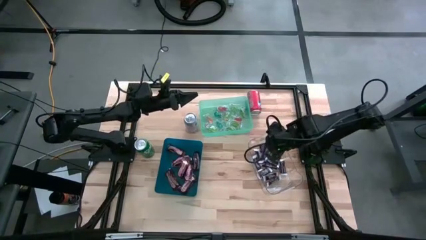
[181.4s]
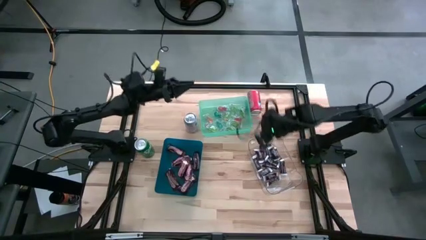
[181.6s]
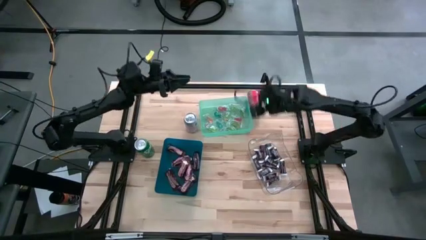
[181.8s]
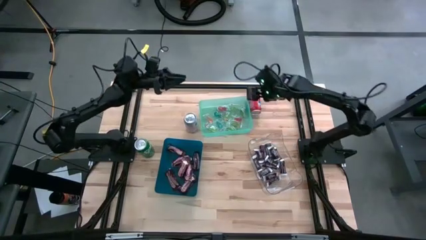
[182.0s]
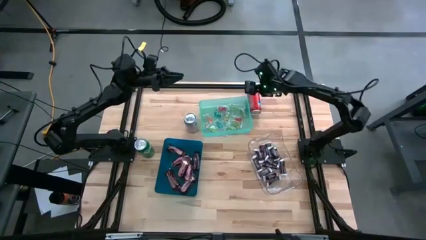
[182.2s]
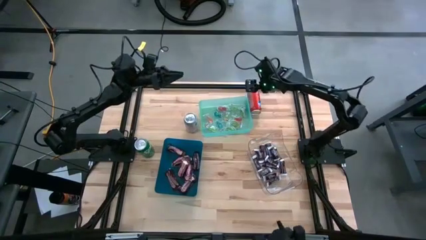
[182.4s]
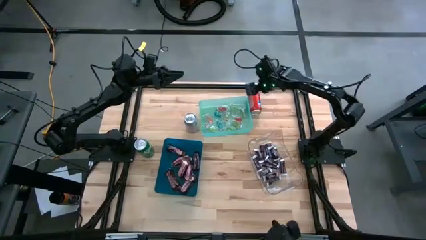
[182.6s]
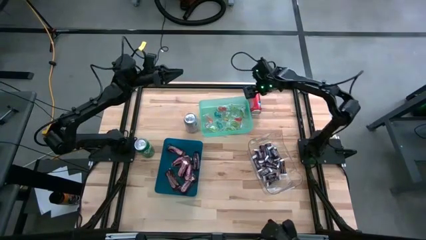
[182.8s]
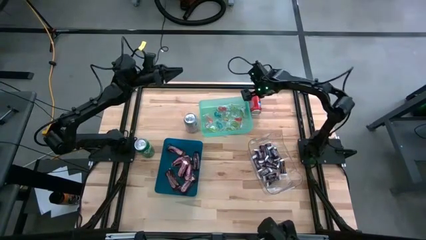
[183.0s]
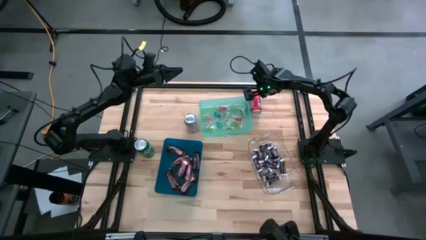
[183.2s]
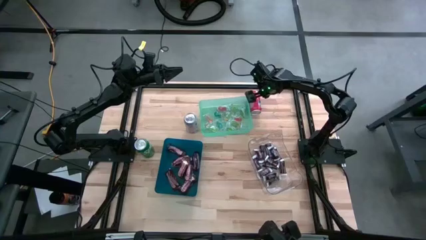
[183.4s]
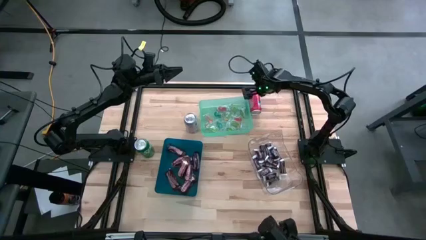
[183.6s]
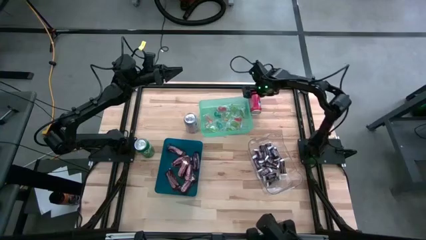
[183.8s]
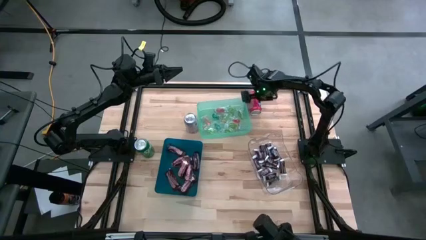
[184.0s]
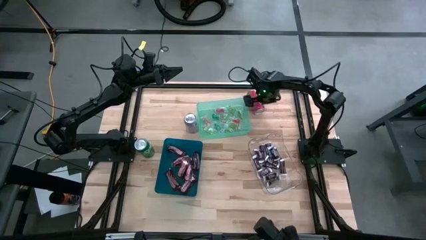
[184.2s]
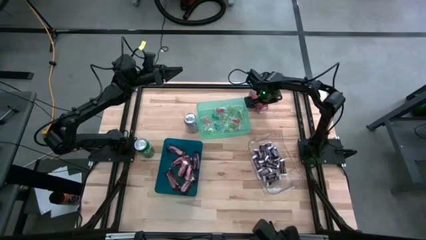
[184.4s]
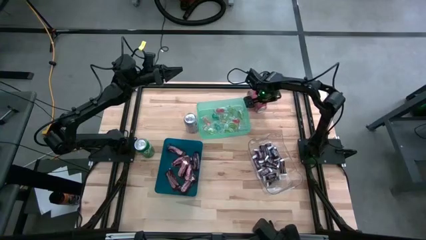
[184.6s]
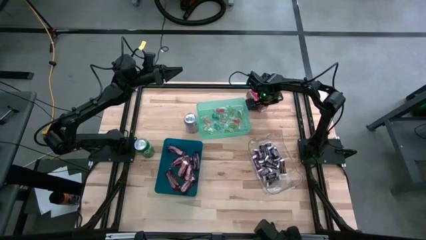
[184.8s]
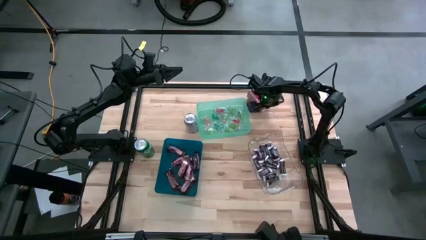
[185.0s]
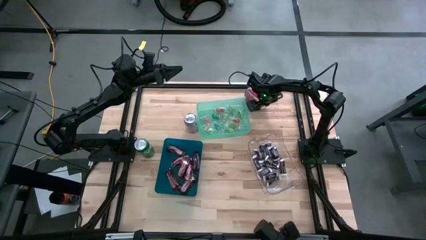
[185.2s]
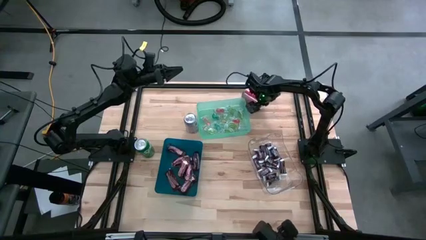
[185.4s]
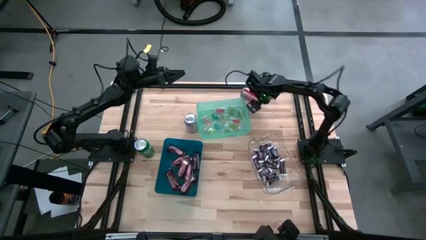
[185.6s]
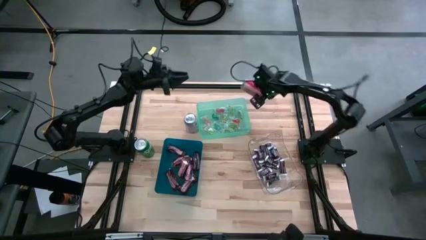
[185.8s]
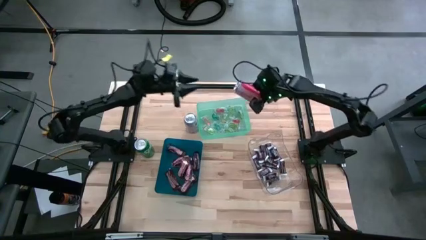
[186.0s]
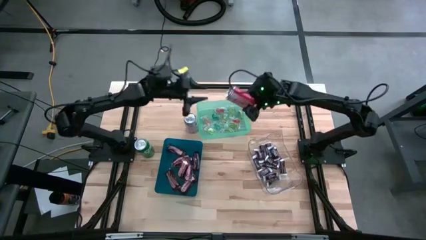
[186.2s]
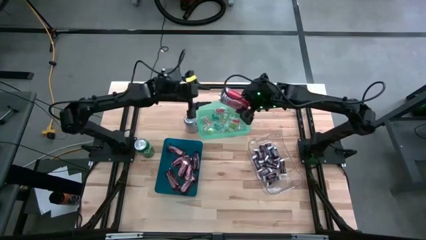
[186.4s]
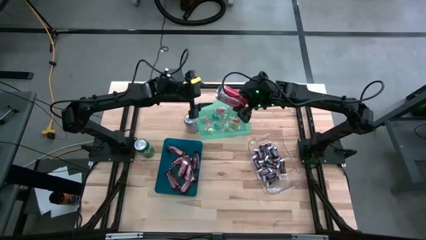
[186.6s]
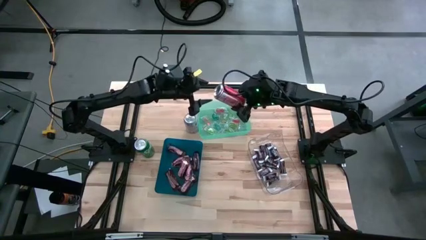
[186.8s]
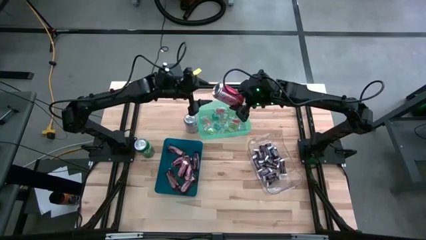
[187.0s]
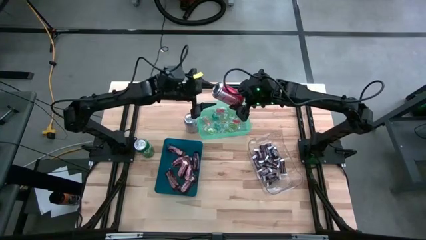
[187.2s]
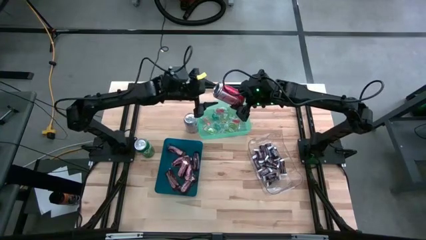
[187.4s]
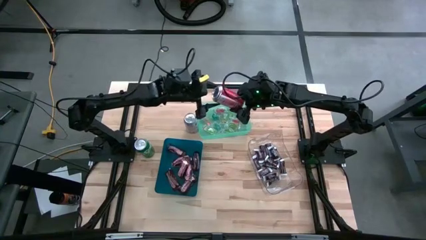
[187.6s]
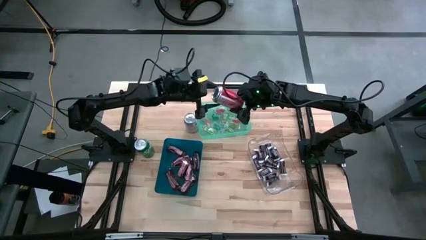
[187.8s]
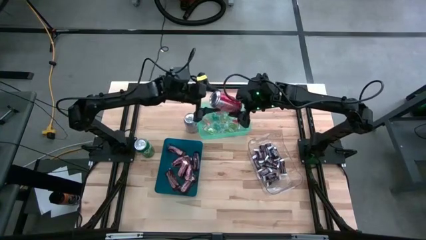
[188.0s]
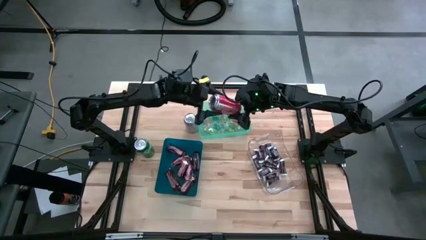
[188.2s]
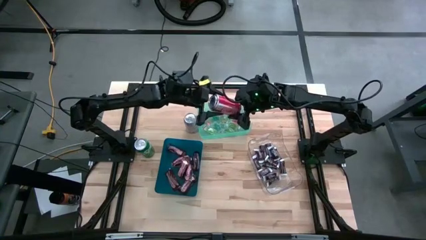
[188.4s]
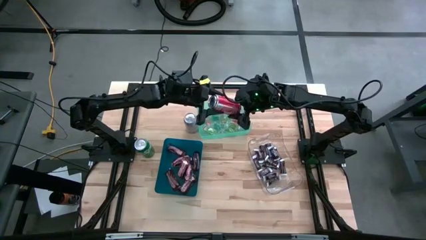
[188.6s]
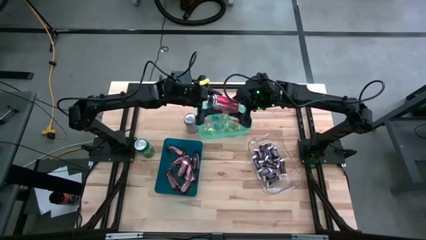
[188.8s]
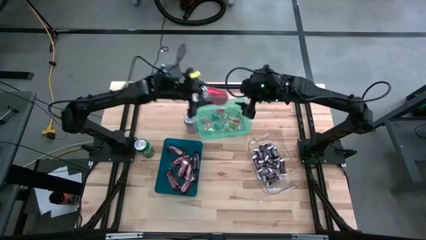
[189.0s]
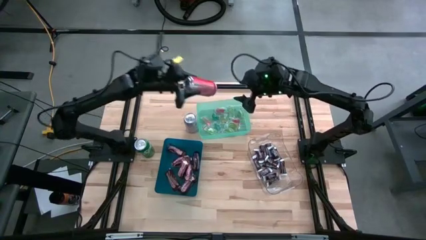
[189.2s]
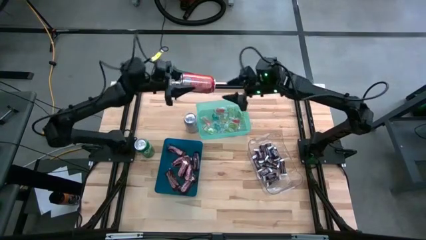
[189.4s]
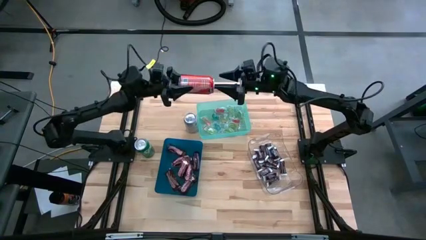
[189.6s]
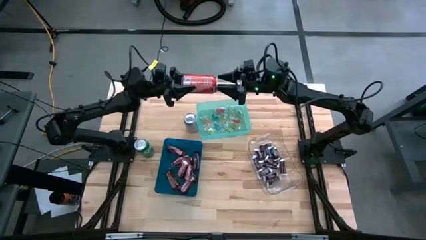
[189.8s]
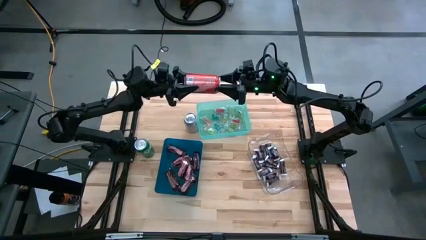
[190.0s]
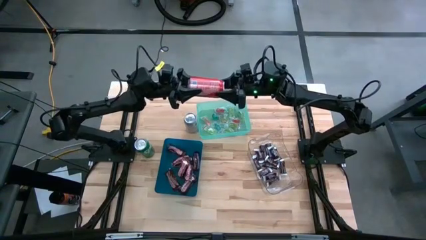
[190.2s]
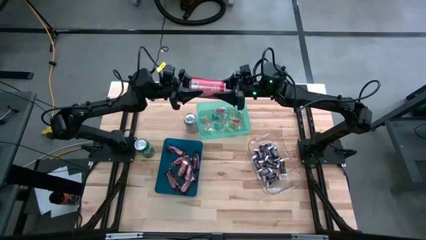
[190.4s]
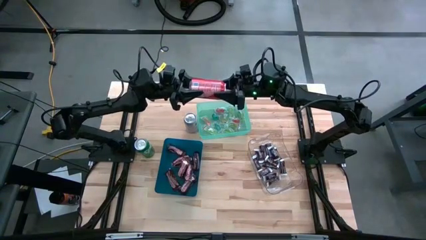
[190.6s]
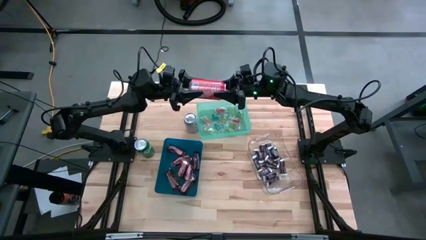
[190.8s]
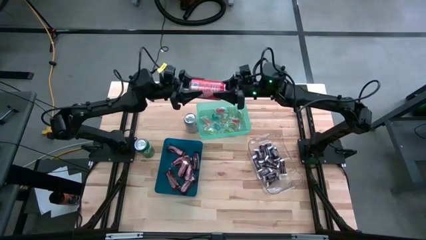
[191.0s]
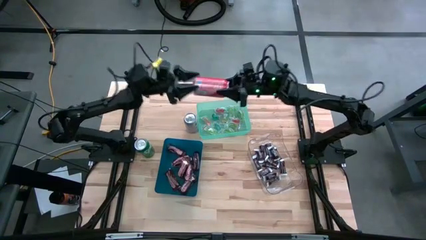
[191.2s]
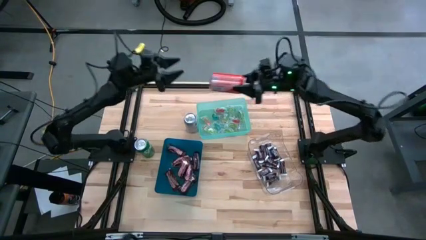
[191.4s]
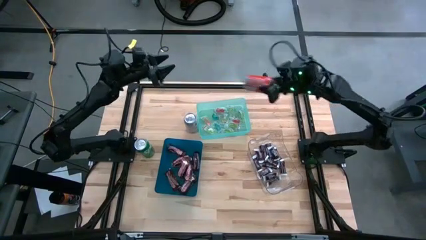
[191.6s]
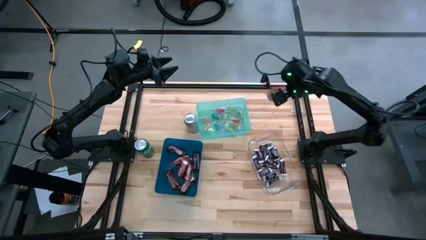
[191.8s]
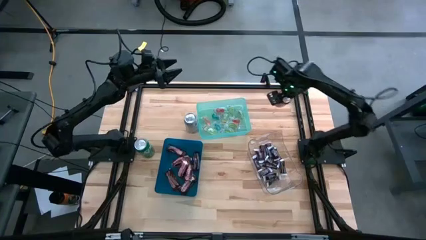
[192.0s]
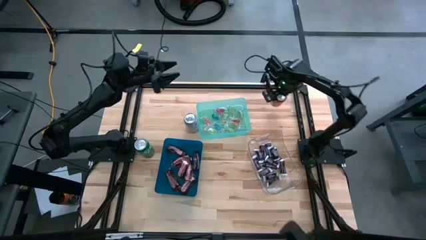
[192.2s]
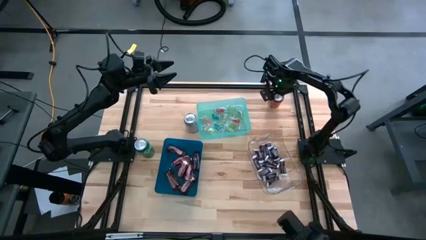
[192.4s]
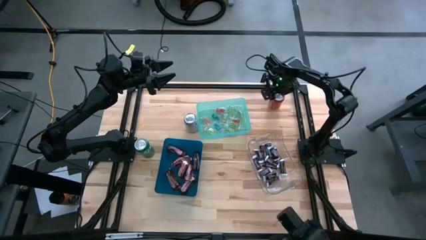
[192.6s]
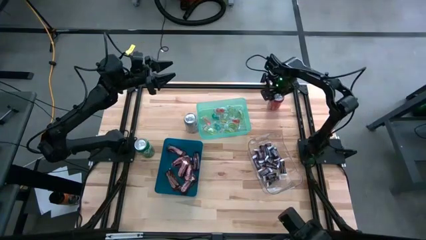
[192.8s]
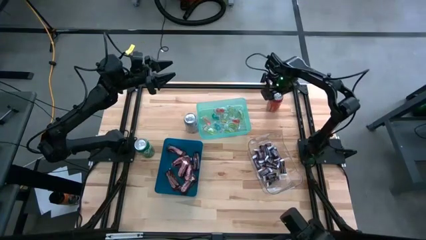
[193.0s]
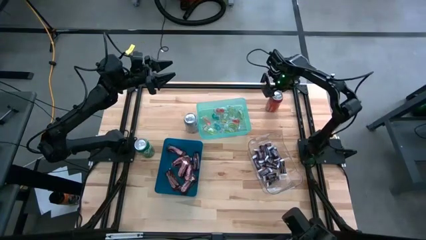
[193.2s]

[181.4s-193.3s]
Task: Organize candy in baskets
Adjust the orange soda can

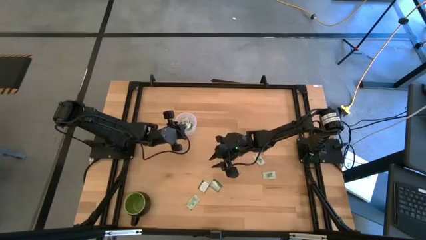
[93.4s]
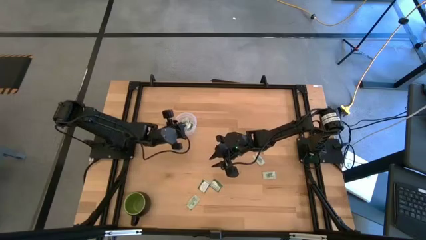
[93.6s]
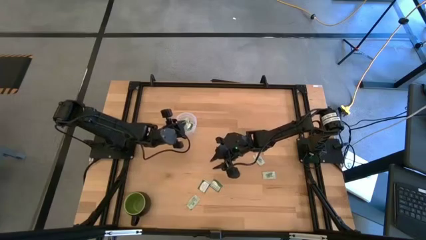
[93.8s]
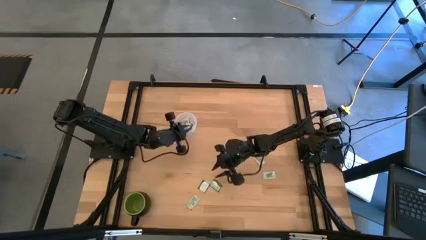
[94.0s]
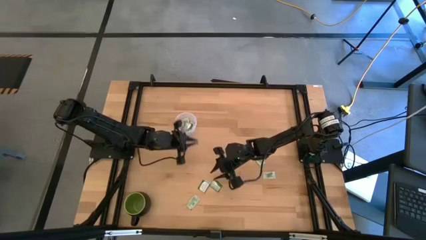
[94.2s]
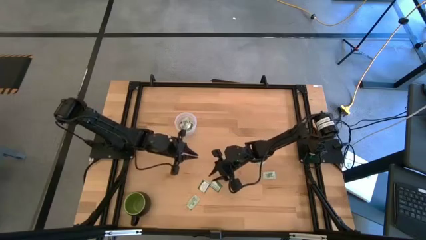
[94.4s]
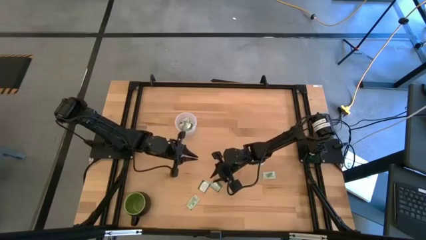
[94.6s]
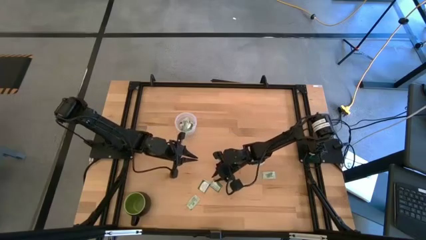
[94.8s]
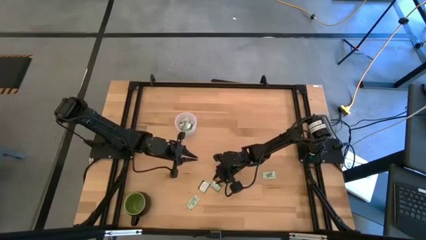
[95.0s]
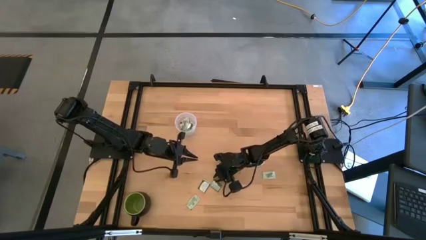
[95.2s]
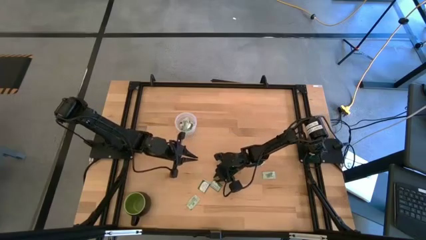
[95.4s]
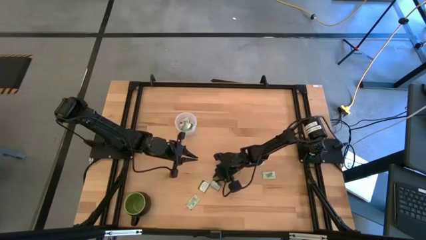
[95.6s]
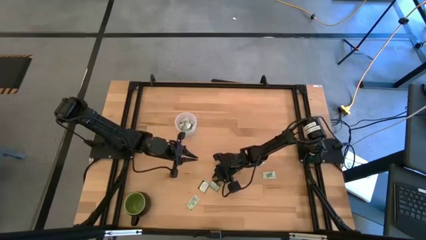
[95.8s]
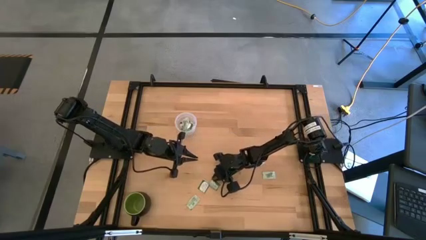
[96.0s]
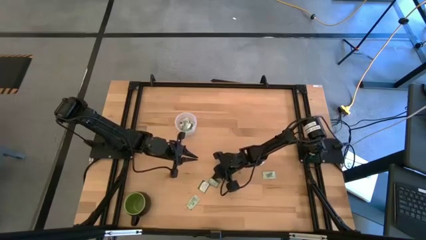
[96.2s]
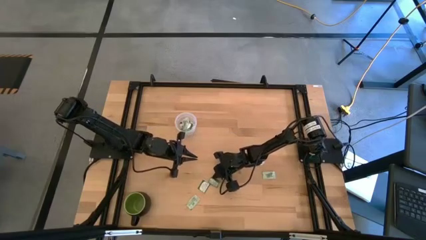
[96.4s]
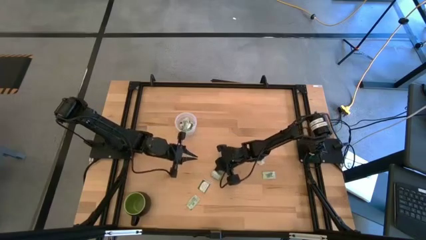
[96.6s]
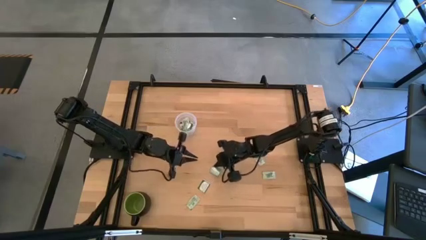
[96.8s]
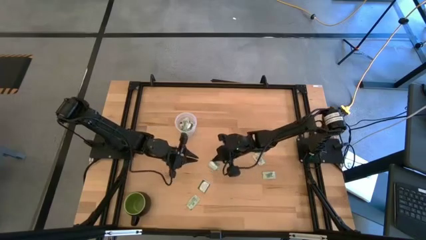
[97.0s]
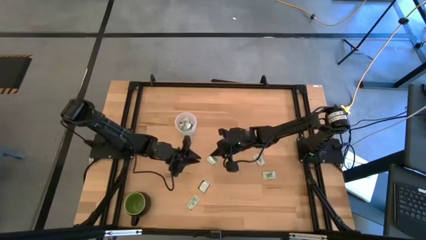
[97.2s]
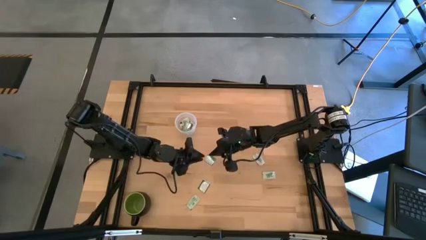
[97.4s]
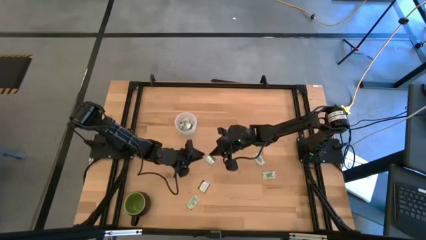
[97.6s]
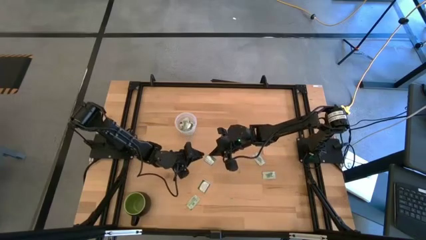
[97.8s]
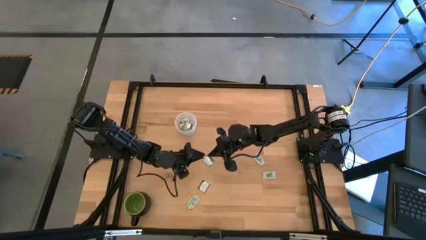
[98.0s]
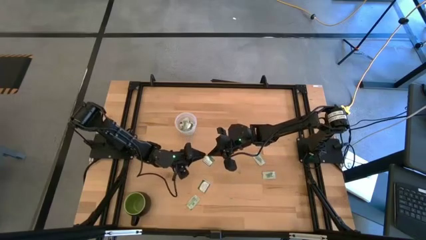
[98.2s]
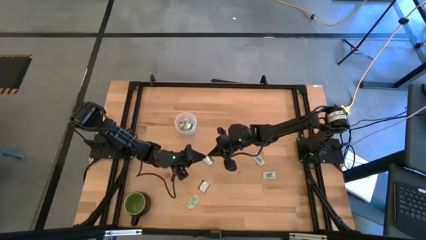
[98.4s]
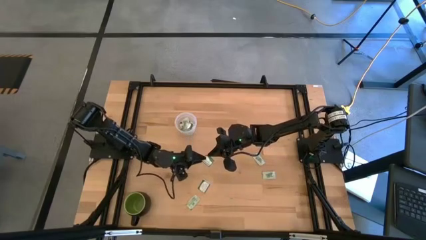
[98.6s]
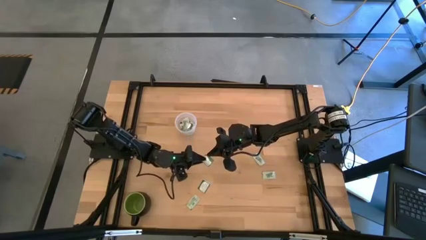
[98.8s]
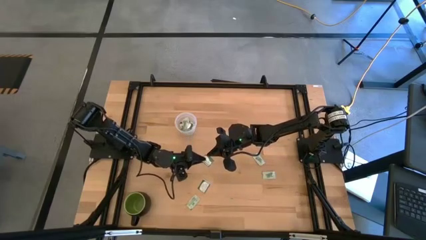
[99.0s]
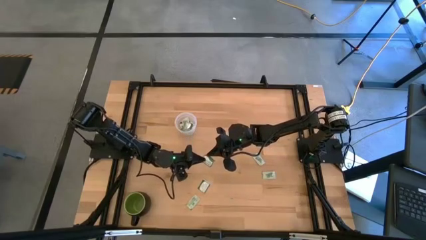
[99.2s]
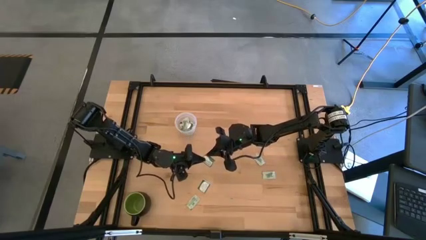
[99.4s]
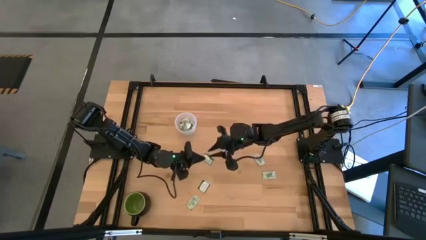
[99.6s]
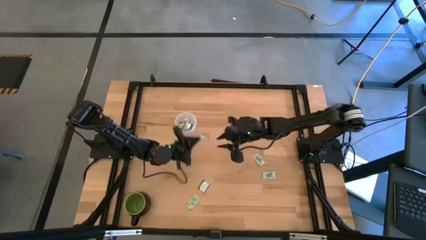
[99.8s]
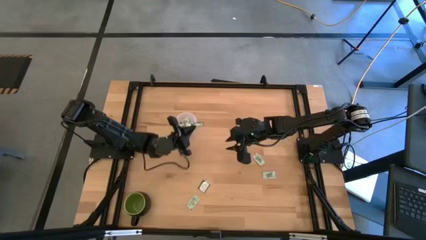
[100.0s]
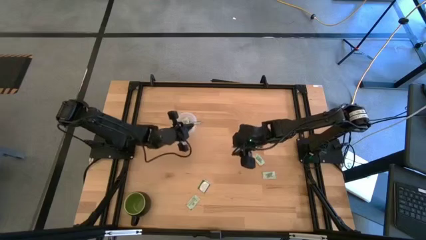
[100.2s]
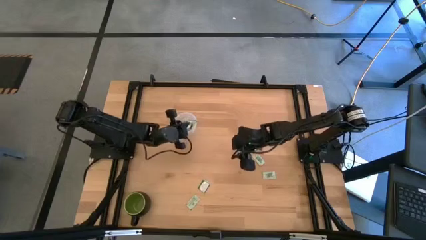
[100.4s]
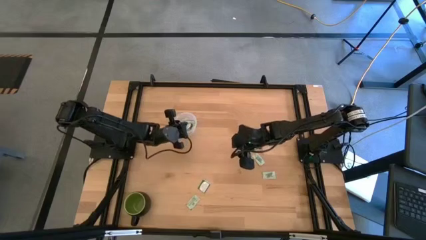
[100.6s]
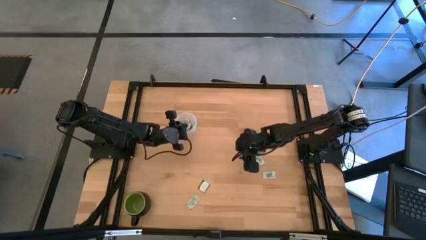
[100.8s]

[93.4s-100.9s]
Task: Pick and place Stevia / Truvia into bins
Put the green stevia packet into the transparent container
